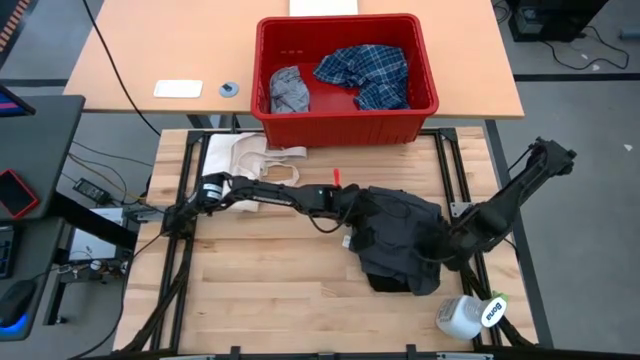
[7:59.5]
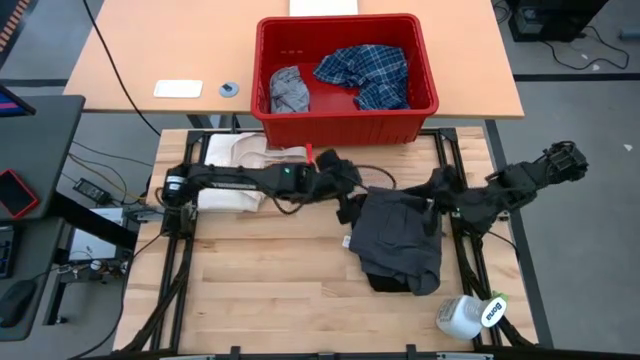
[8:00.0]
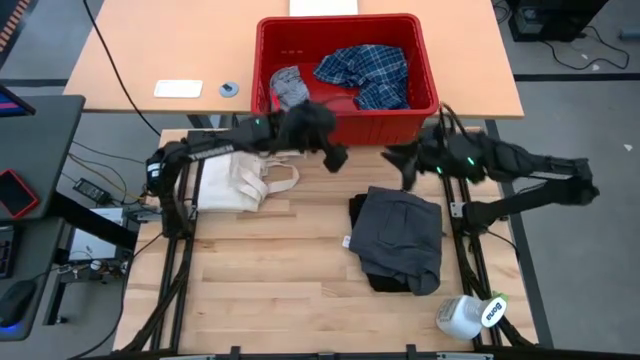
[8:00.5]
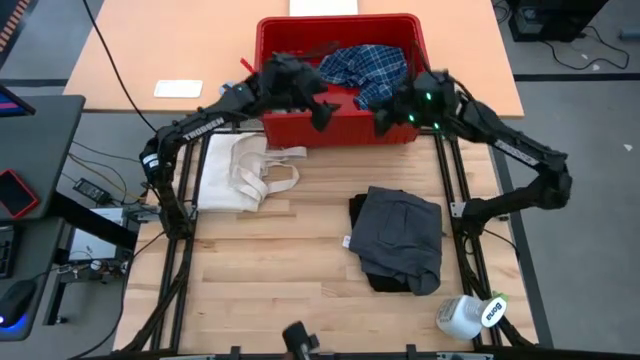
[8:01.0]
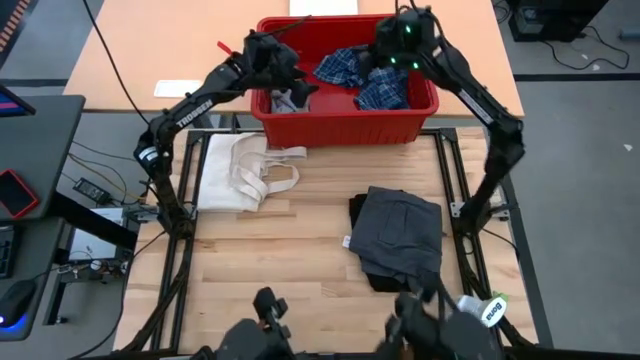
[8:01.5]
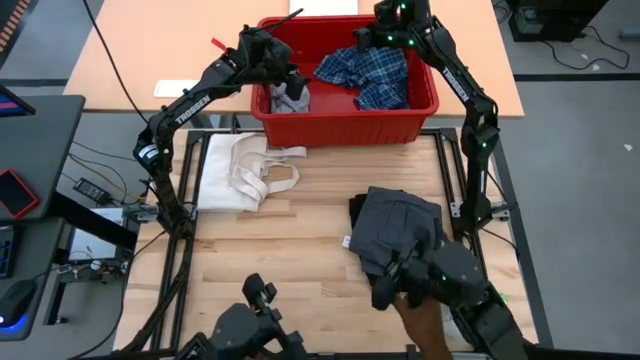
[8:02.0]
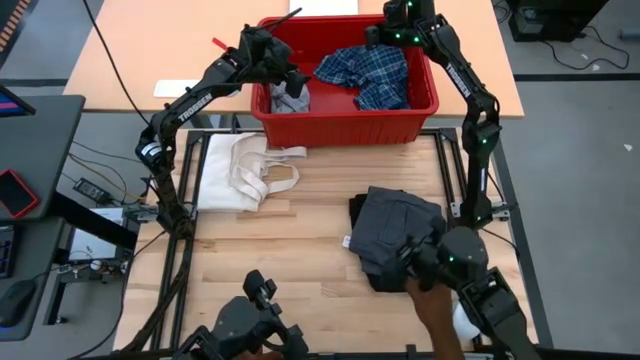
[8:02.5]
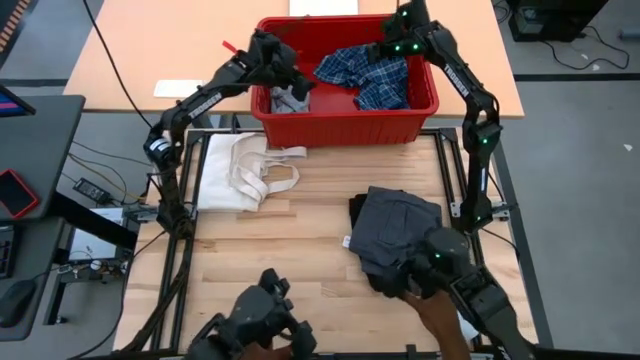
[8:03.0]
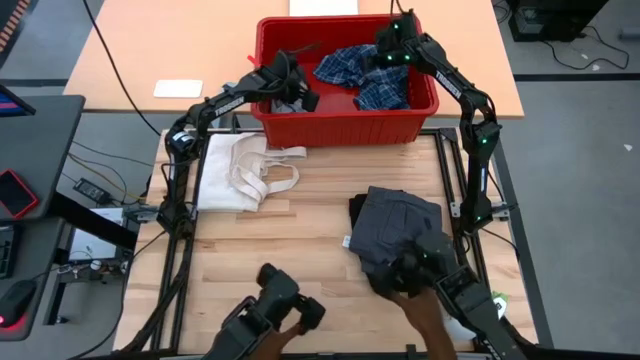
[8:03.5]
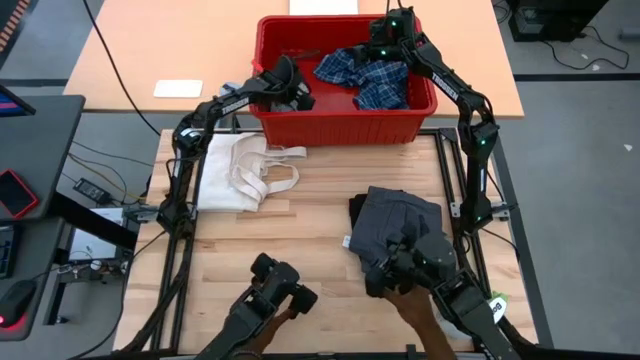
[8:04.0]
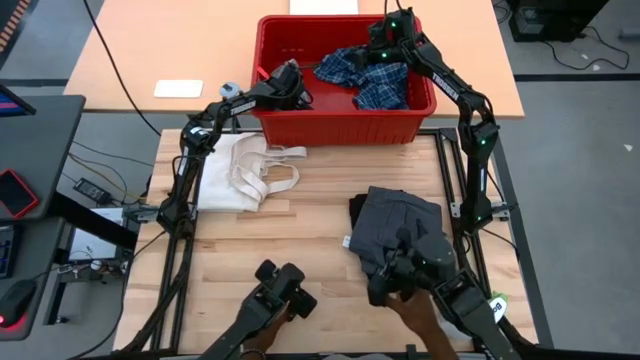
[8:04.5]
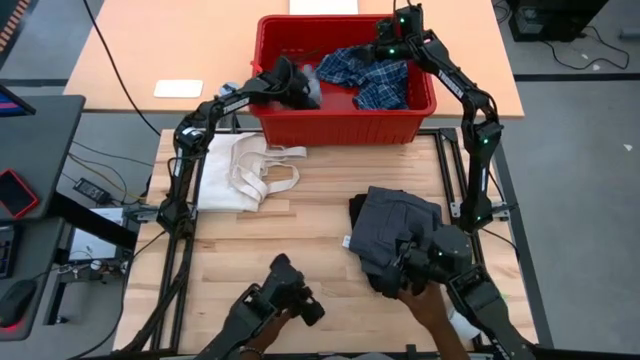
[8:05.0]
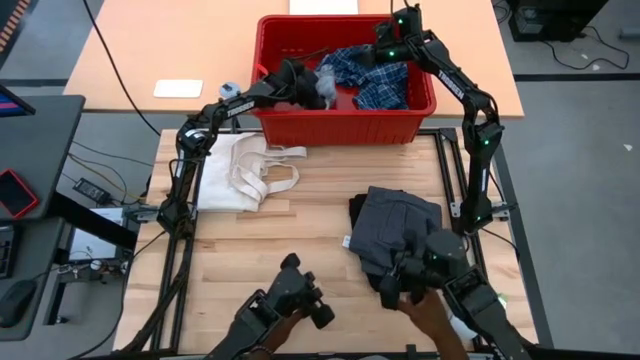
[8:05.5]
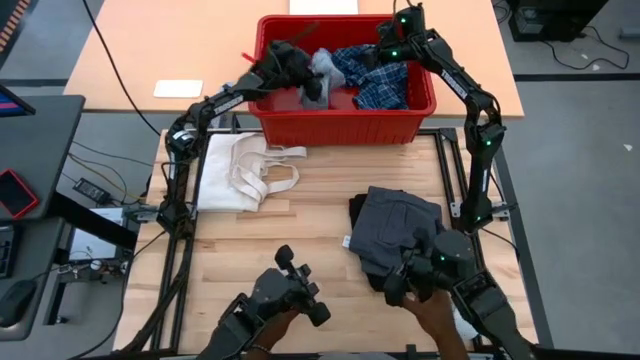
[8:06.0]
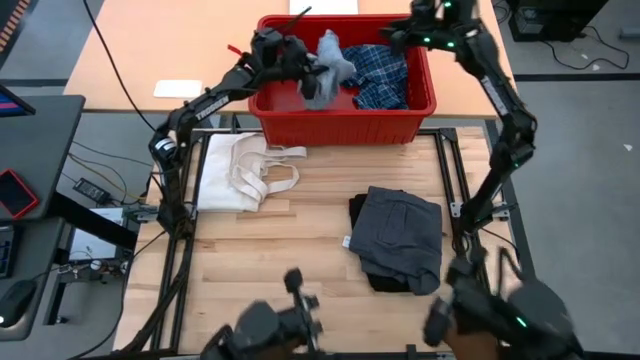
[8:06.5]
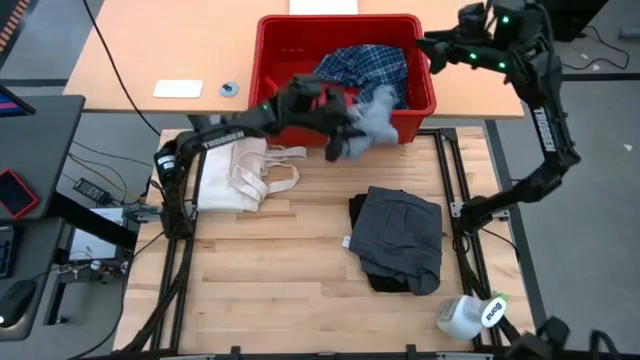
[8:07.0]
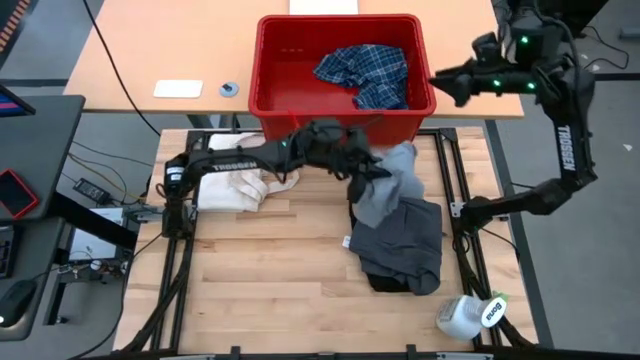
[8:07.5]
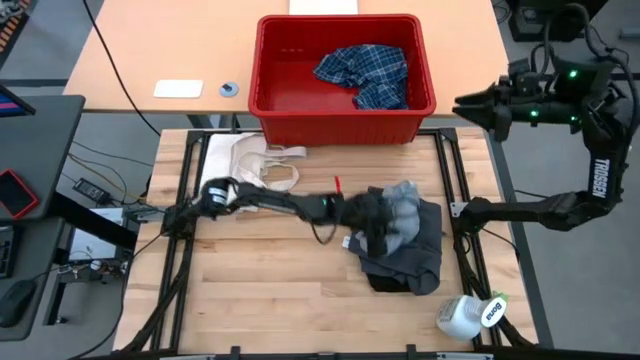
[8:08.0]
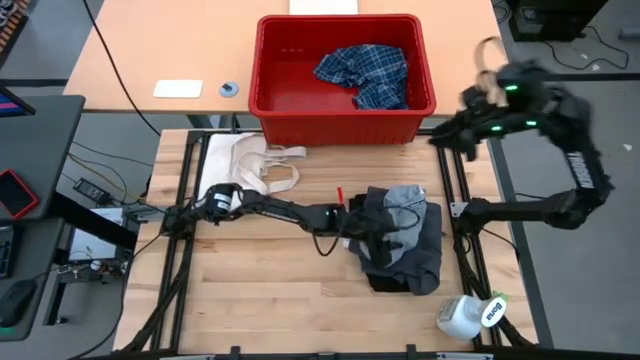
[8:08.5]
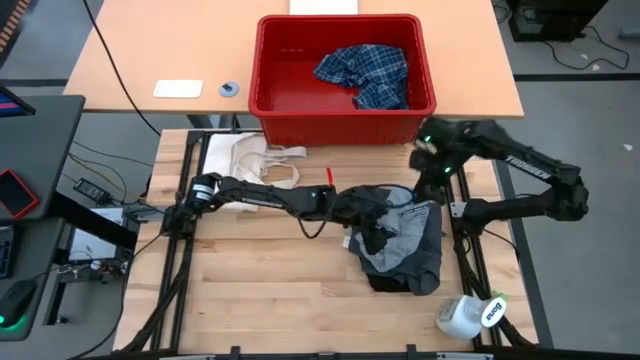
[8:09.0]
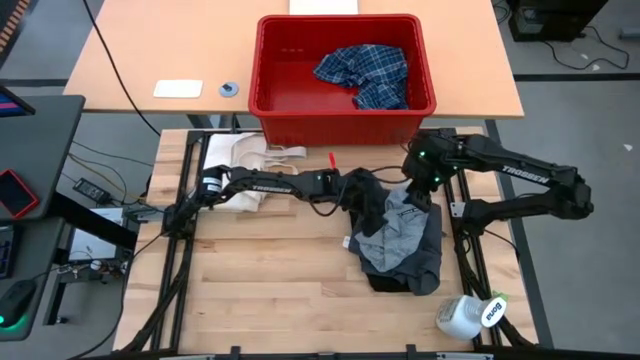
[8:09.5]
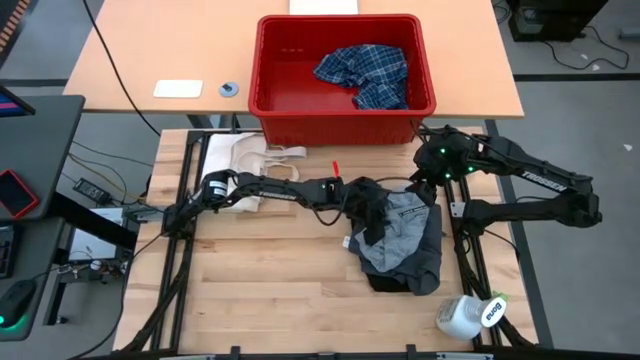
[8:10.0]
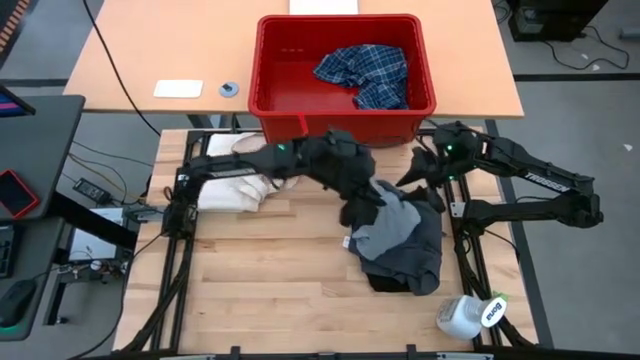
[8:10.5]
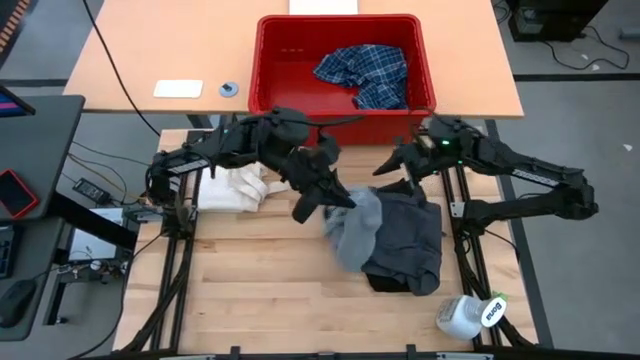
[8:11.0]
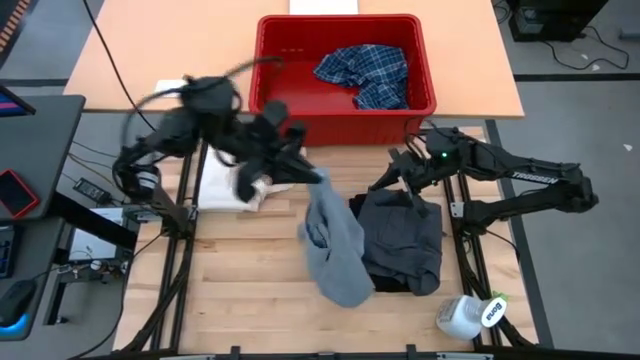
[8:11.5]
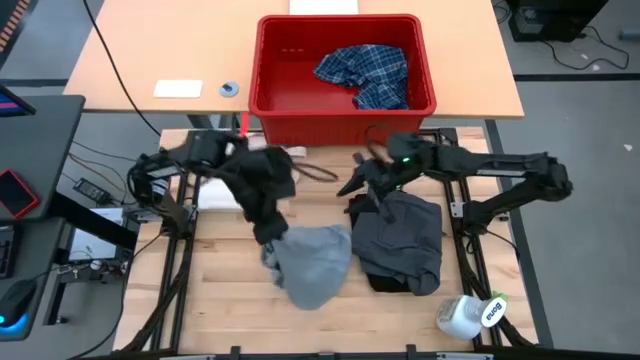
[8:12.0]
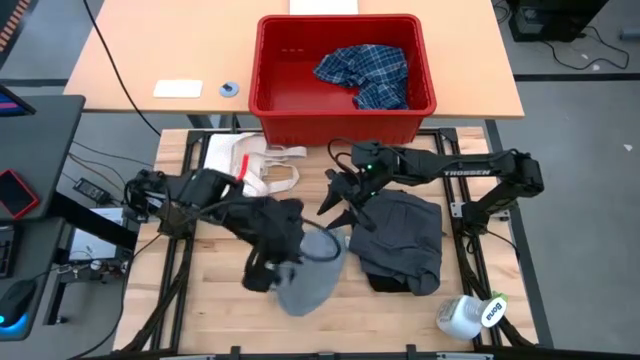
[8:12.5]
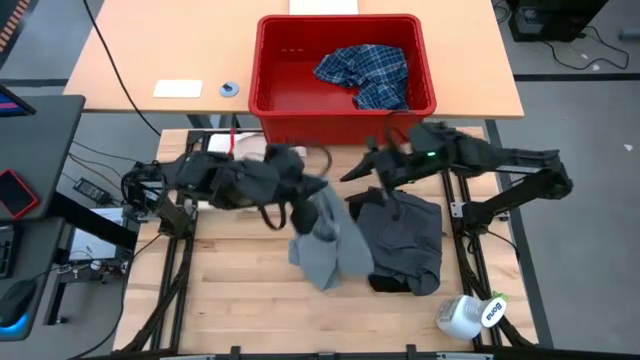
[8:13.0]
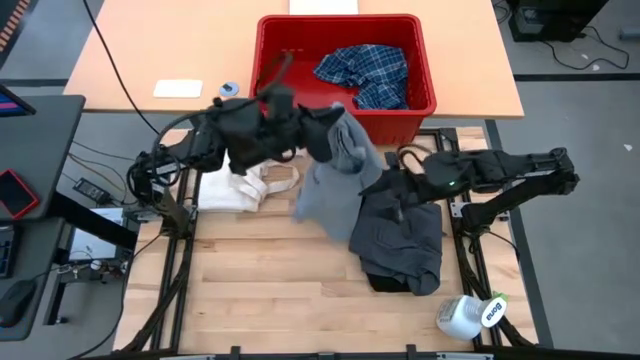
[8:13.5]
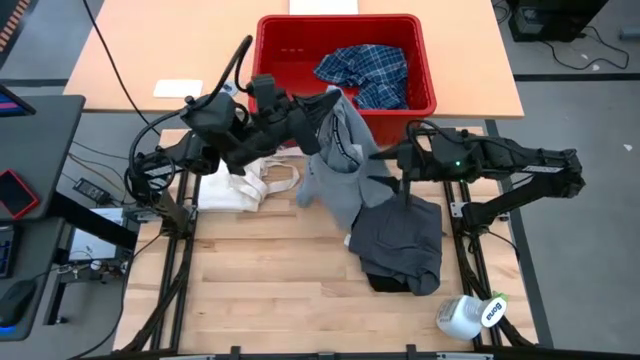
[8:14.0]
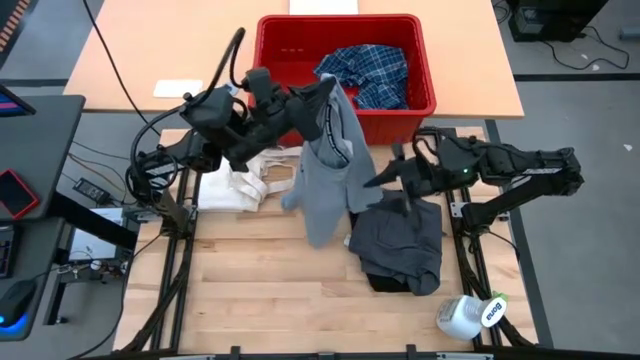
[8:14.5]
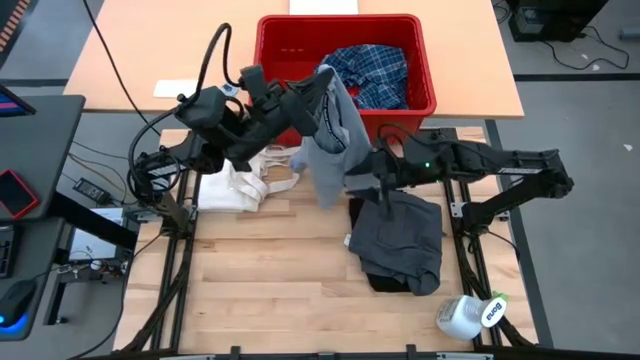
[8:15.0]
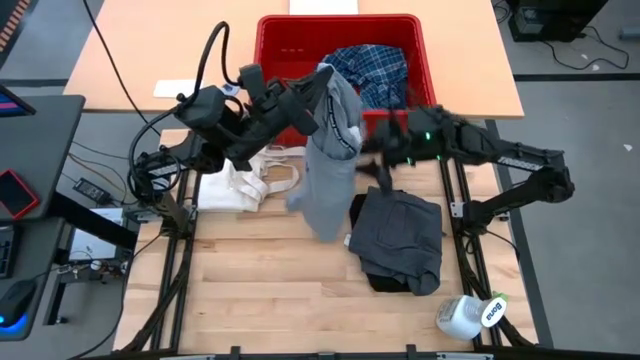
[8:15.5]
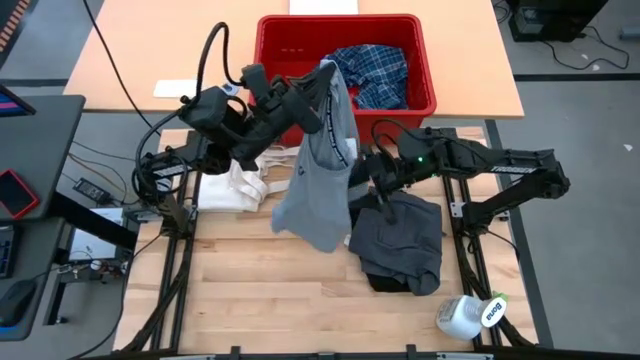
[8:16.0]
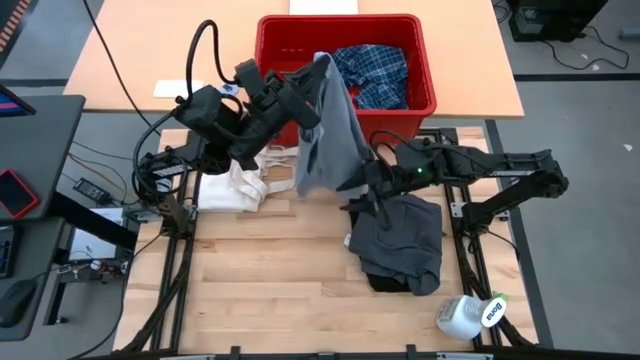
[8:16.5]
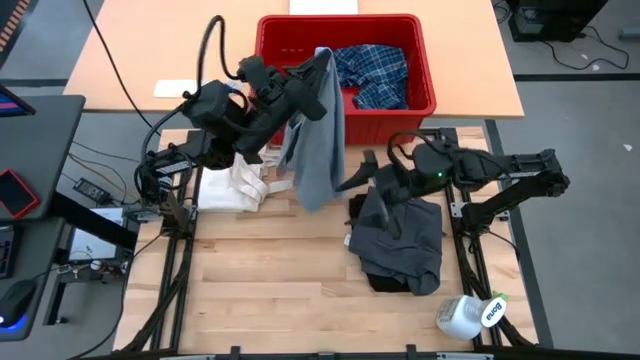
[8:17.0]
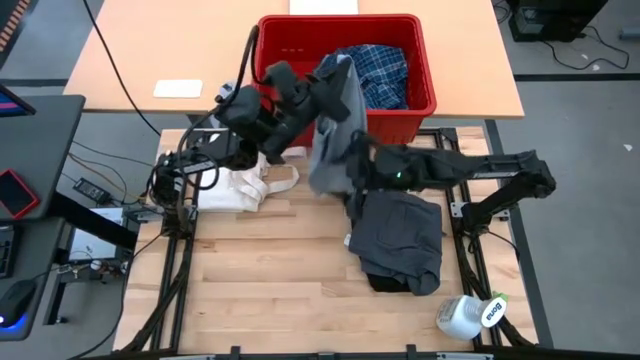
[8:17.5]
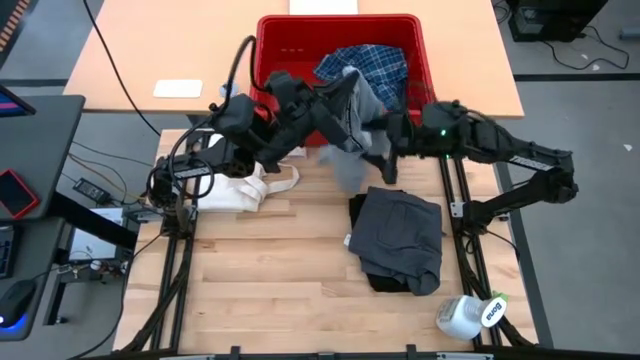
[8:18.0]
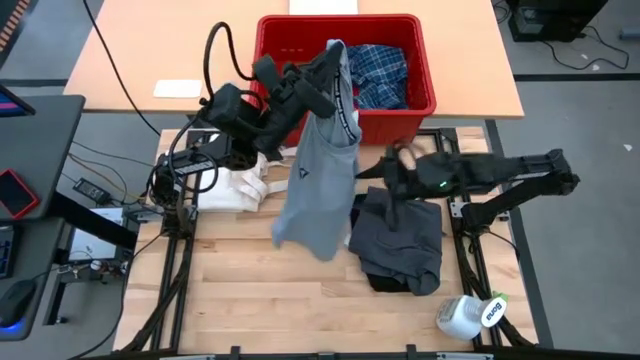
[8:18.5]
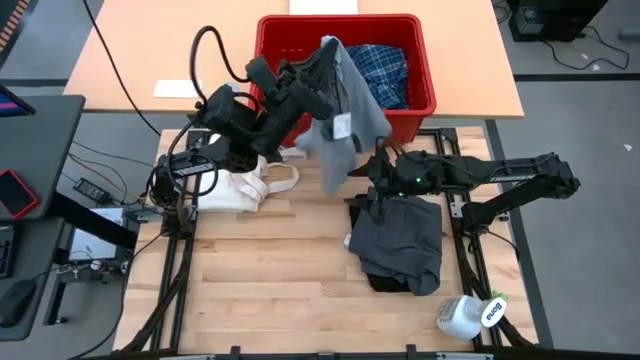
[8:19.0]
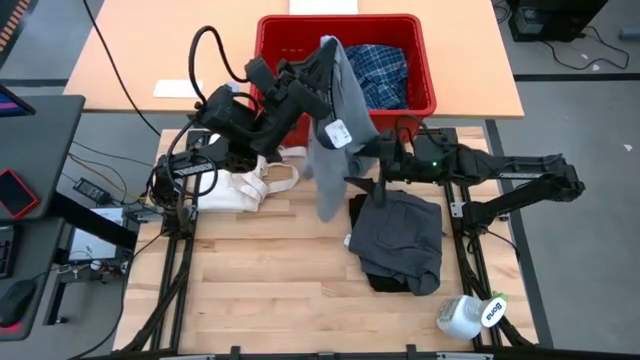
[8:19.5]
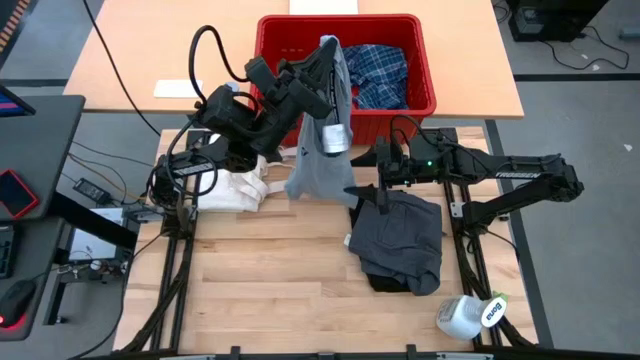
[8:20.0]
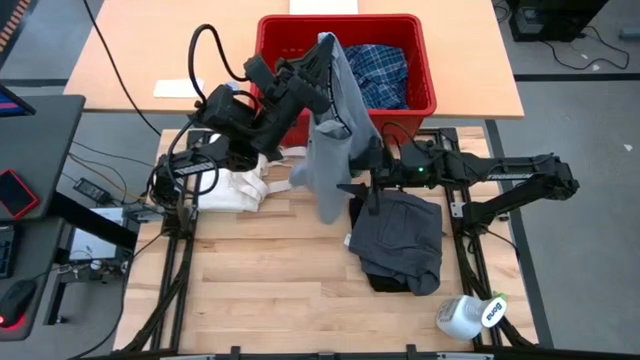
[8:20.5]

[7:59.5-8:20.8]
Task: Fold Laundry from Bin
Fold the gray shirt
